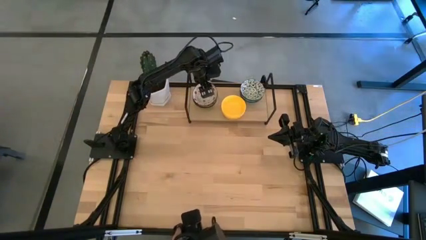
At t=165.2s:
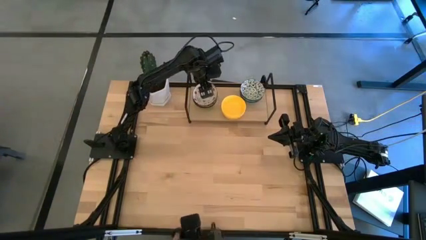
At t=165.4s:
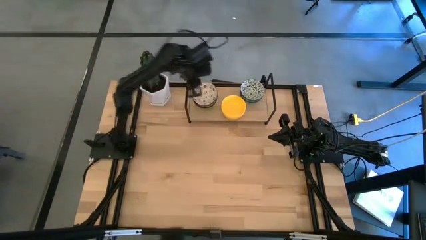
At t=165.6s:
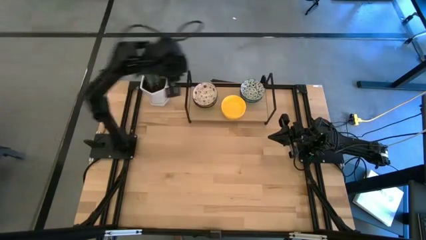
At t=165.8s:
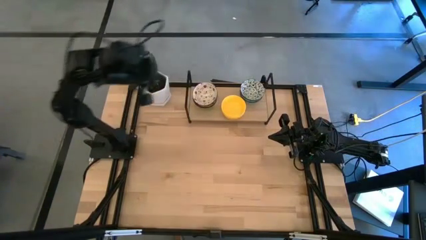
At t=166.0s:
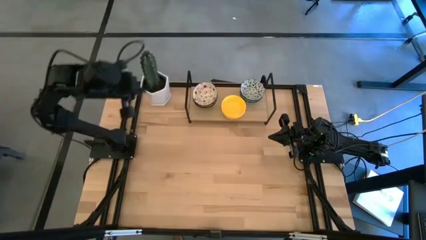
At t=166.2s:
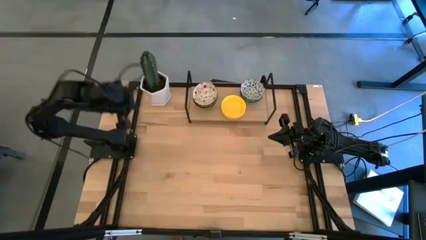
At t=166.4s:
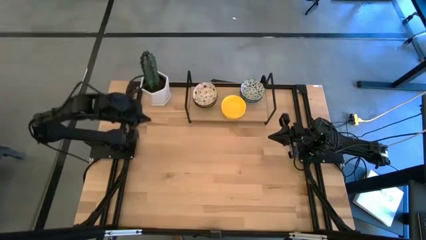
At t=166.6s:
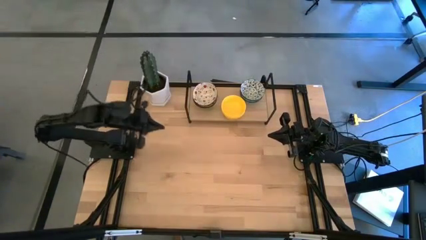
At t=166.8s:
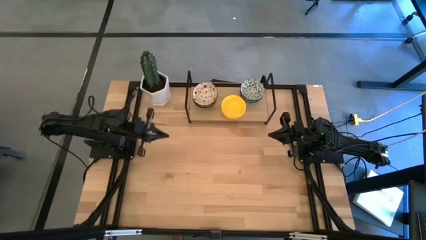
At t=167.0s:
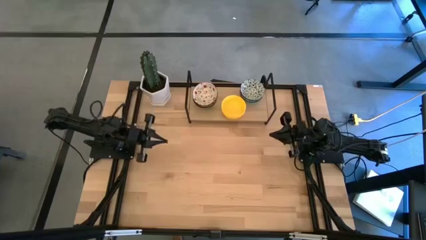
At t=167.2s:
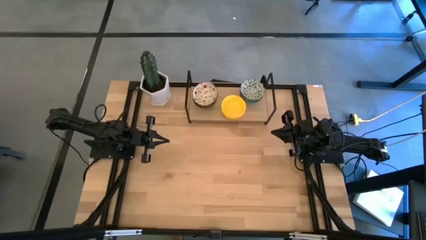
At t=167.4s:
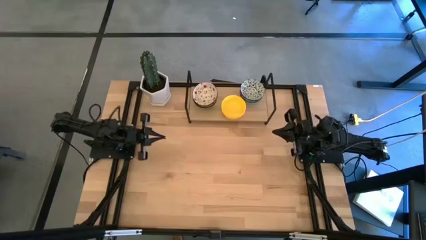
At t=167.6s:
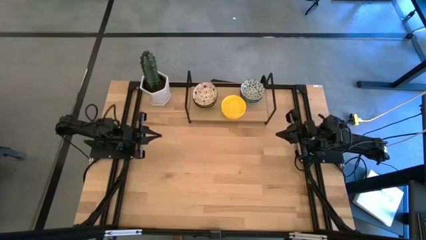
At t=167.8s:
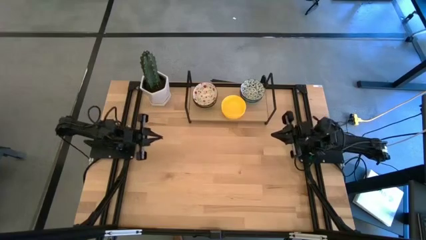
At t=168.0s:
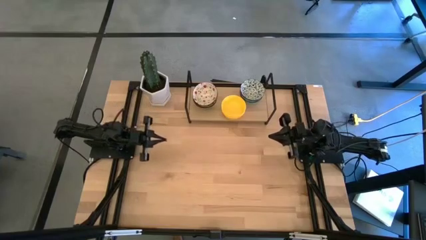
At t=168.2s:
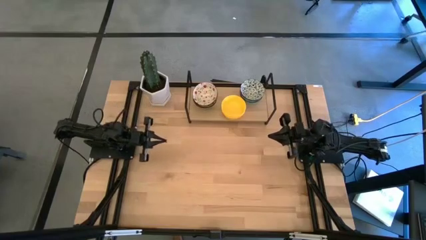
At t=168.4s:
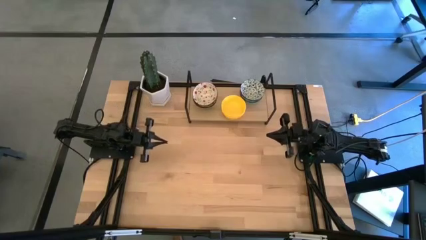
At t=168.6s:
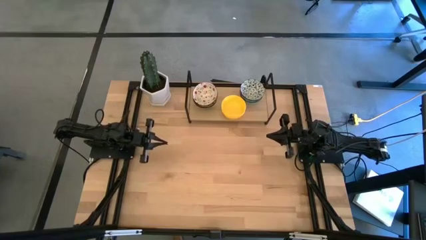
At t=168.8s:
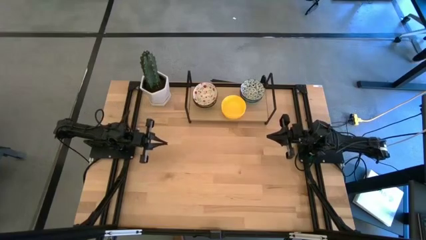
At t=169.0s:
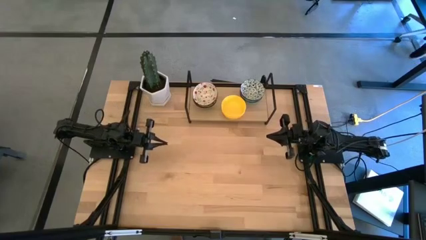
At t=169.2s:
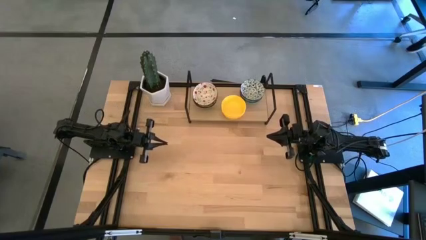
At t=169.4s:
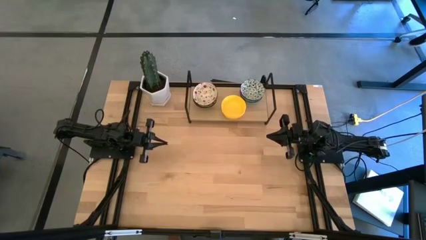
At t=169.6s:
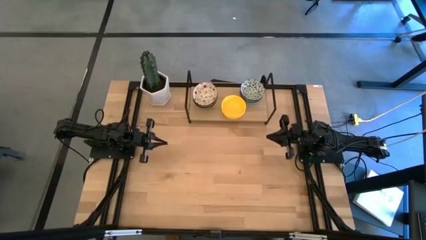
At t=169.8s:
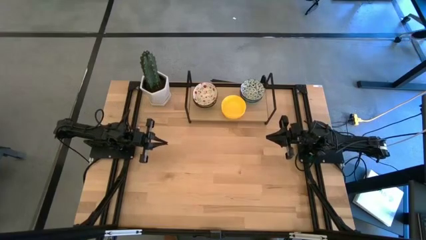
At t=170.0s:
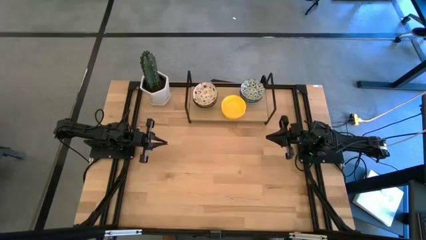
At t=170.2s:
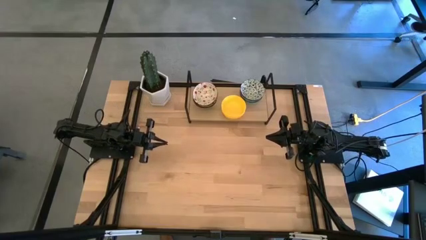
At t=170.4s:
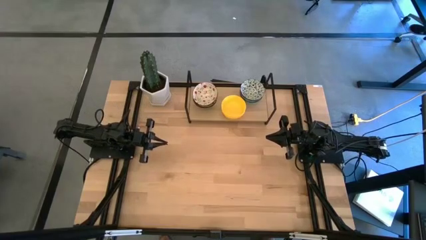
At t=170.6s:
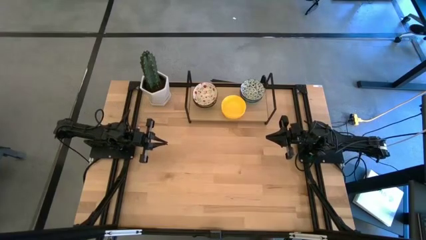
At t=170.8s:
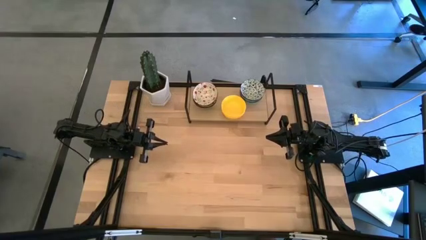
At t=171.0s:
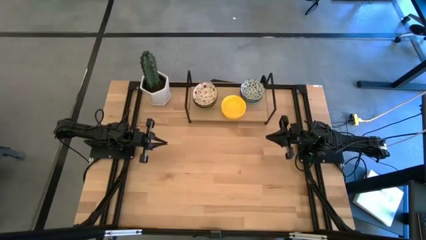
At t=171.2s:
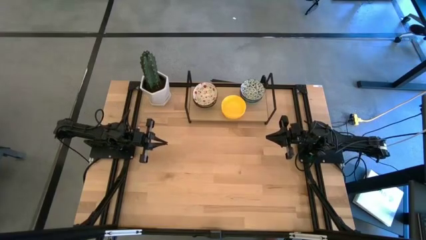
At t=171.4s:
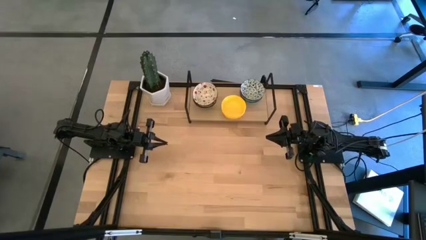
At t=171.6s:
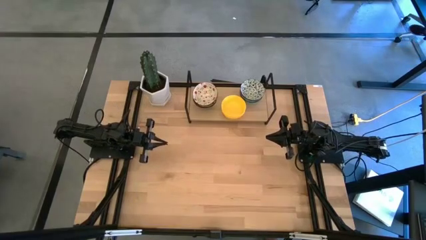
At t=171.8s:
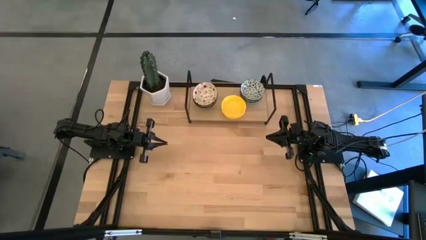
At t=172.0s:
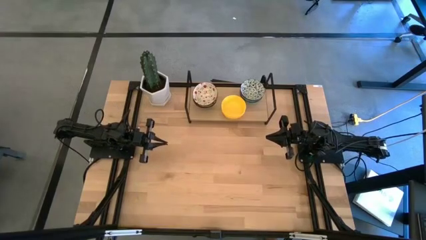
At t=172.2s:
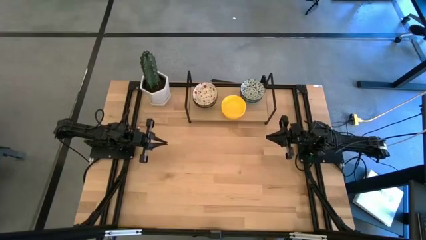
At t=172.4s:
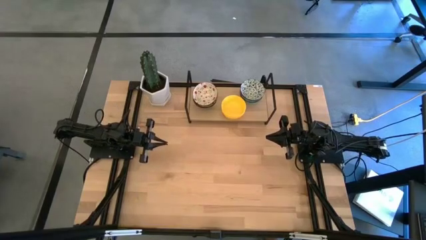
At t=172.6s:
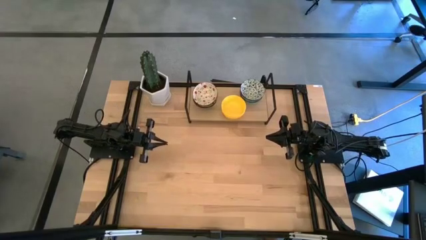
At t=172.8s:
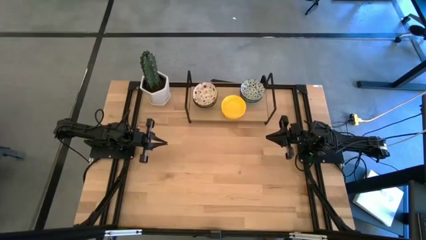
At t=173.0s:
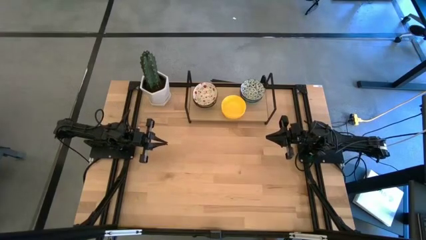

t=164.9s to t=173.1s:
Task: Pick & Place Mini bowls
Return to Home Position

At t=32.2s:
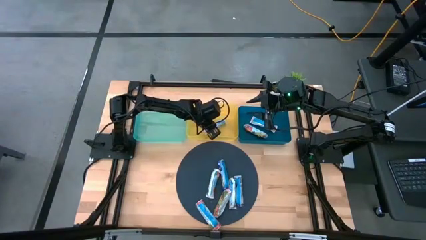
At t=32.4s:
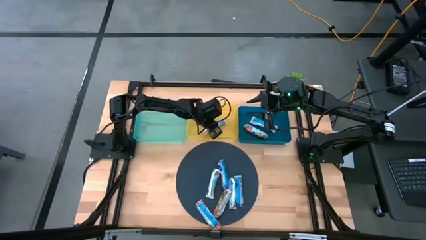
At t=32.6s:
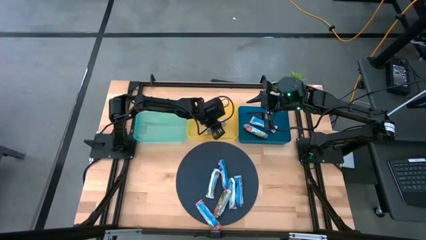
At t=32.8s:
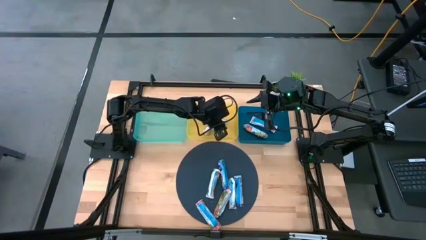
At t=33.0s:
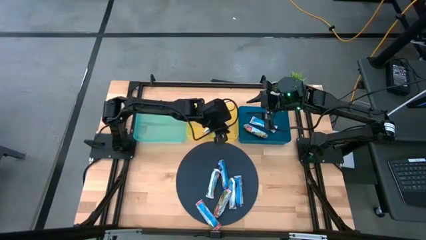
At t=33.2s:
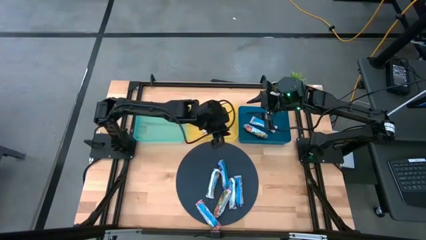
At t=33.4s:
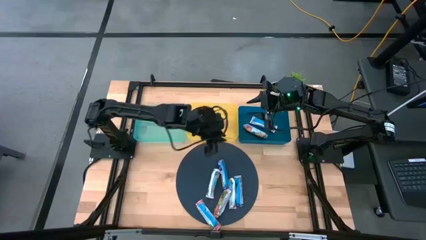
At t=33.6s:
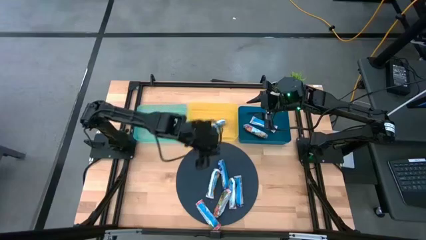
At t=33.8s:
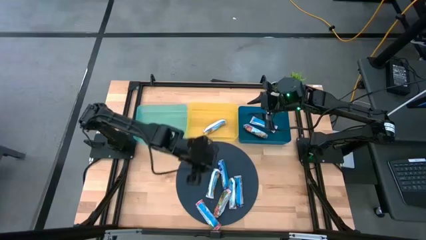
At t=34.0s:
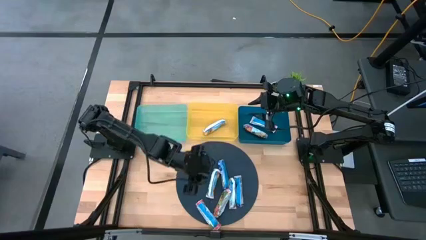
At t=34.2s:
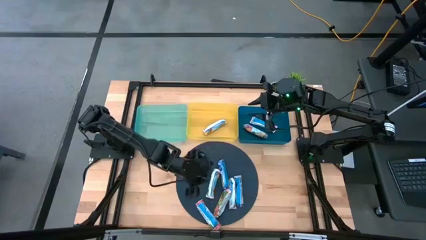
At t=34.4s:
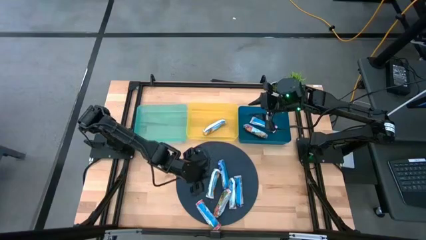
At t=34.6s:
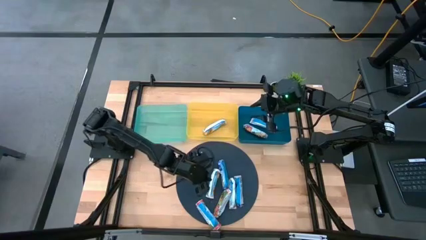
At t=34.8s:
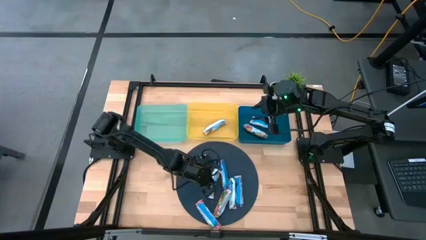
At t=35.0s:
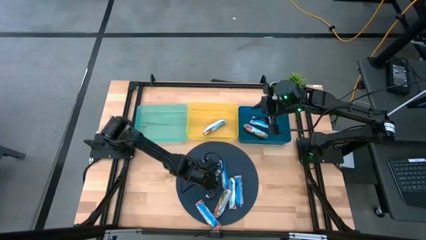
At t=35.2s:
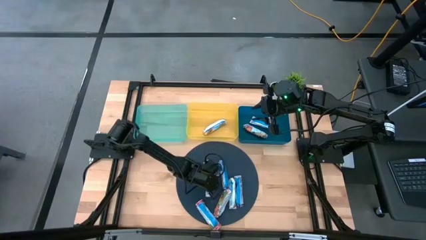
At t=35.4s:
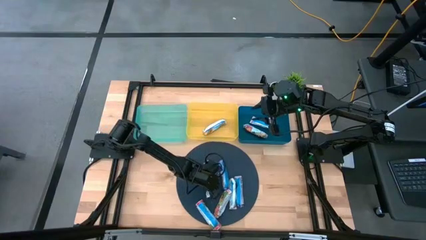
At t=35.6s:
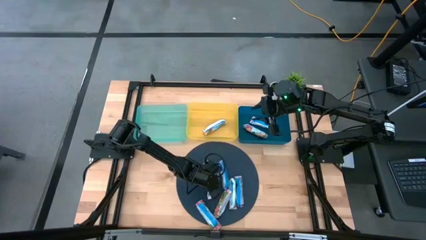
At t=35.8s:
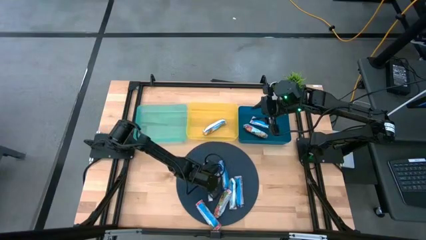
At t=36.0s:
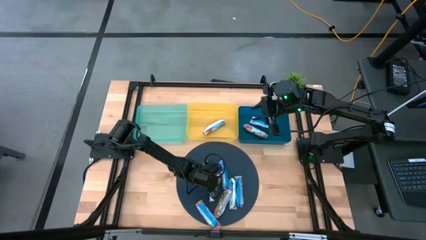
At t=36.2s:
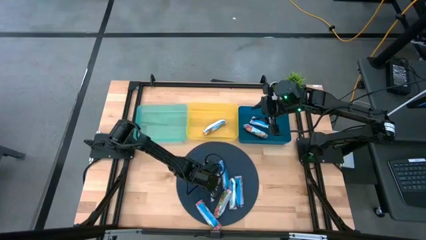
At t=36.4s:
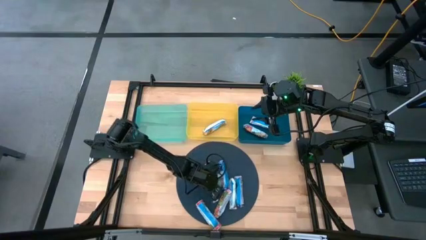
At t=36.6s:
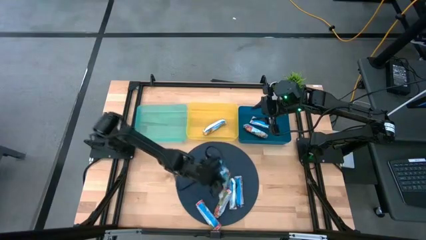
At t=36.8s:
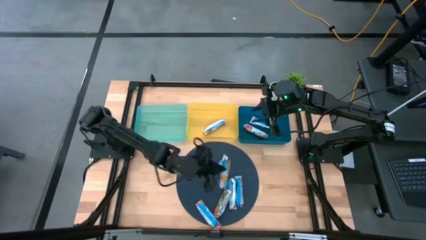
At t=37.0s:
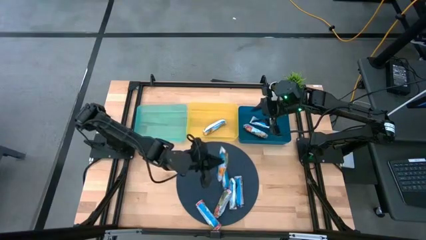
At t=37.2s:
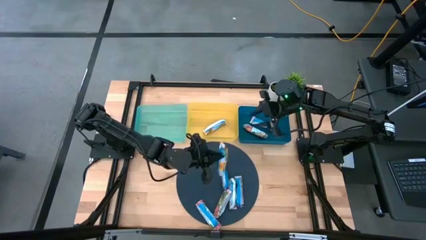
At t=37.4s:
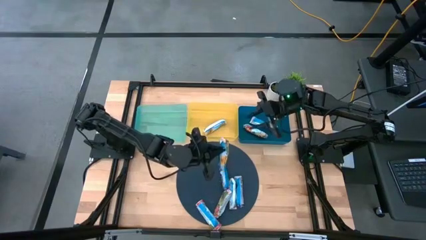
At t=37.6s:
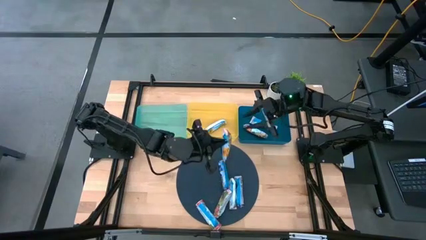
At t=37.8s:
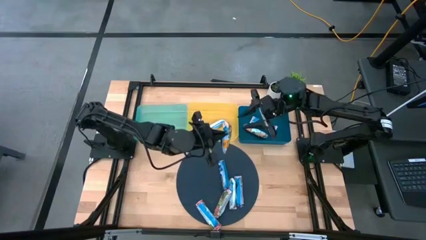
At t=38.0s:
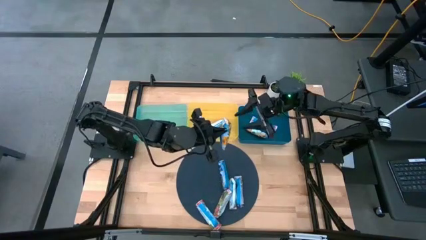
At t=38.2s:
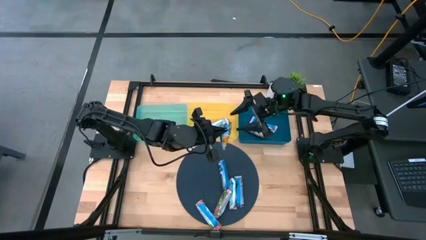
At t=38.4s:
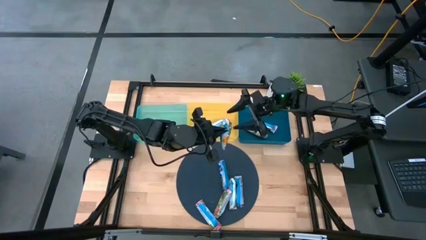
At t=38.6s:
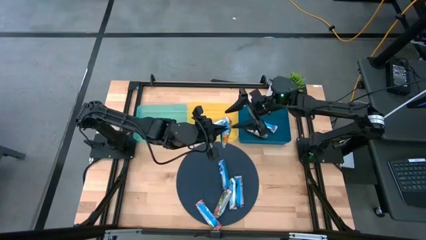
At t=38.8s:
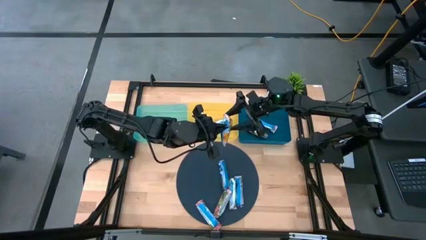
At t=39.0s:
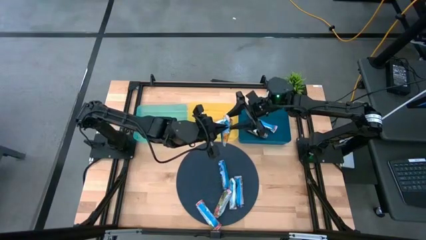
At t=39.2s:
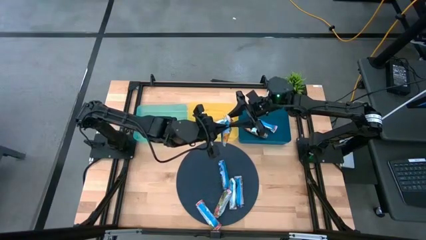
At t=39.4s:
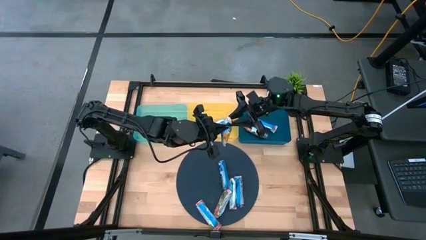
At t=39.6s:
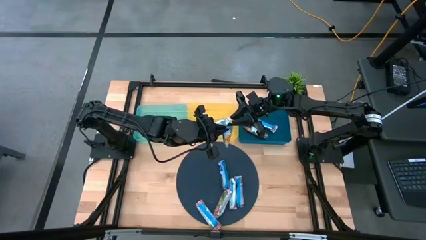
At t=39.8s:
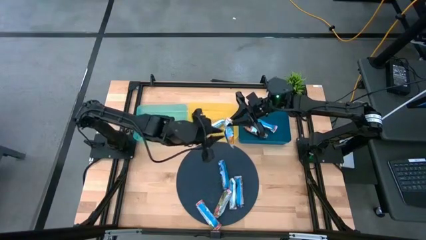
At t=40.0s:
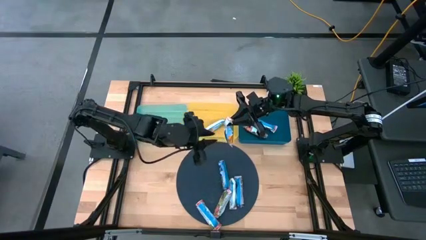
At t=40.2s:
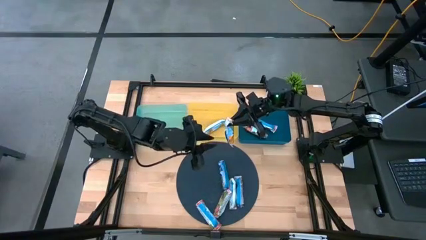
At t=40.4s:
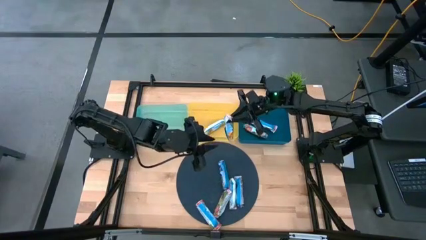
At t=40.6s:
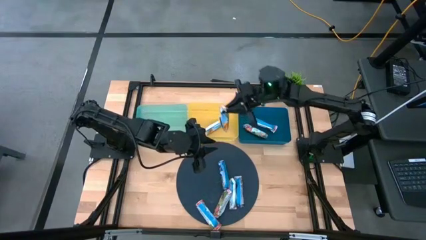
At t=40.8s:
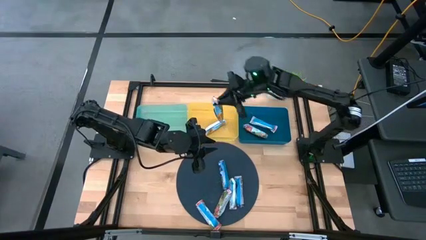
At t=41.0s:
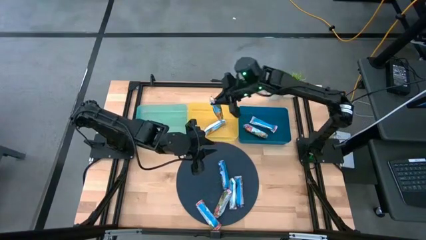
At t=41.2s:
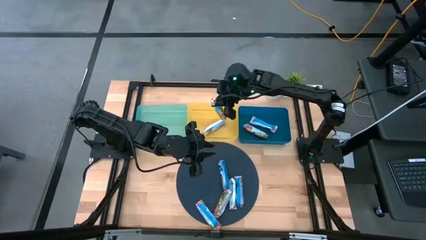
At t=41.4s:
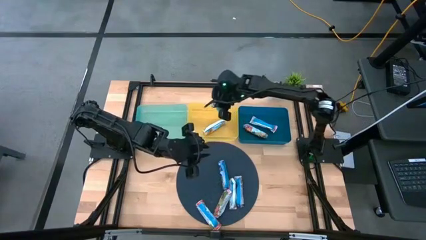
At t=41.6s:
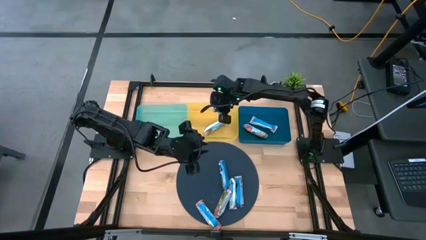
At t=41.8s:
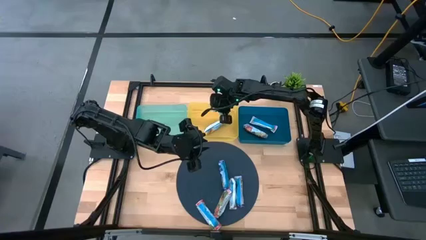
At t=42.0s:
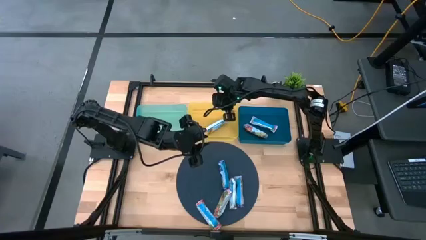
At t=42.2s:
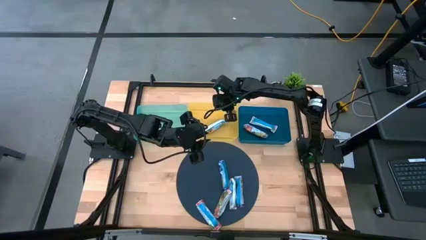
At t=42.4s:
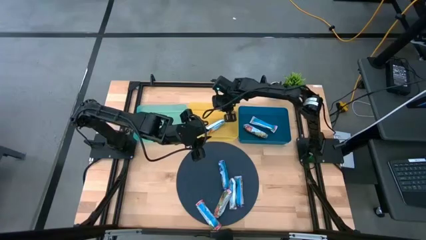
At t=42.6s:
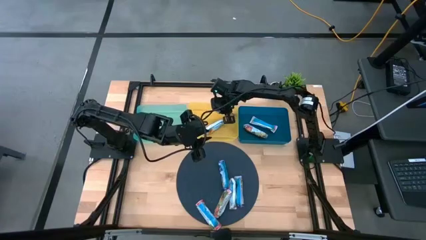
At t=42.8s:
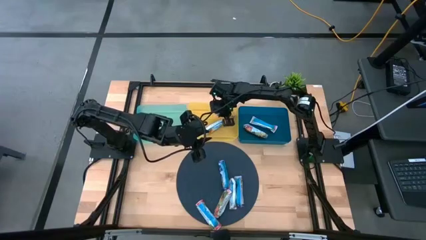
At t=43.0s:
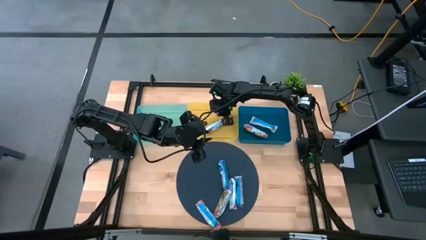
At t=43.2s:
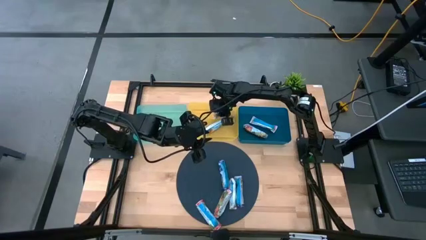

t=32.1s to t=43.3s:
Task: Pick and place Granola Bars by type
Put the orange granola bar into the yellow bin
